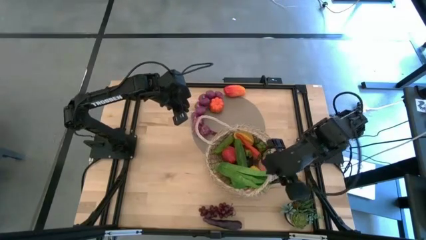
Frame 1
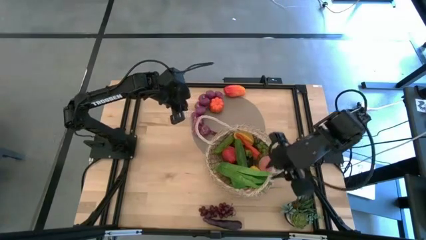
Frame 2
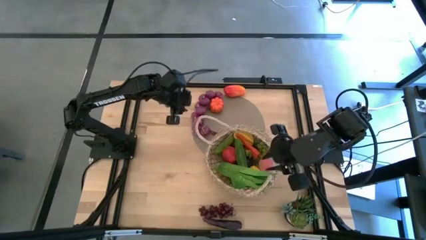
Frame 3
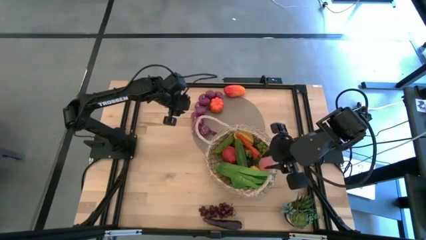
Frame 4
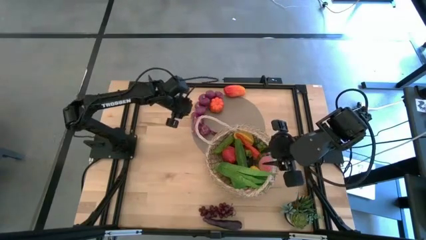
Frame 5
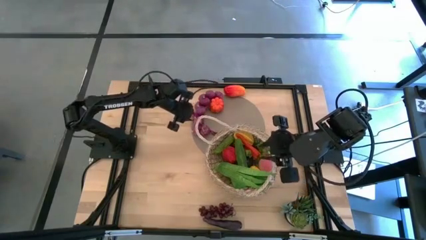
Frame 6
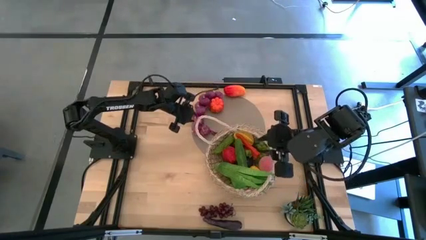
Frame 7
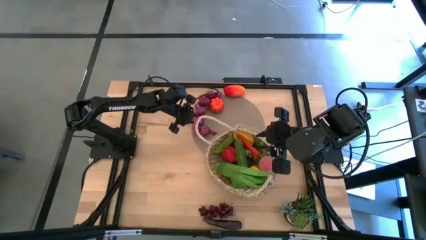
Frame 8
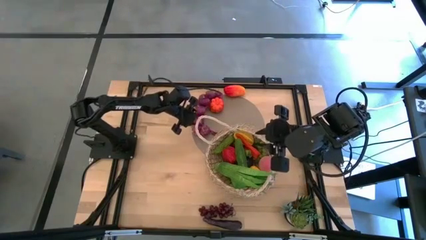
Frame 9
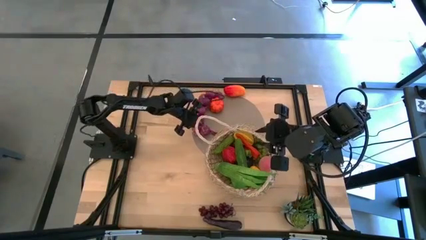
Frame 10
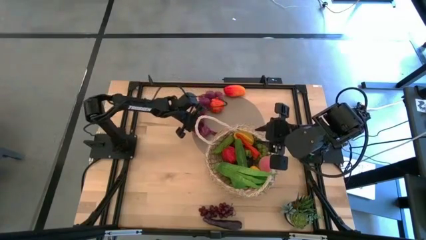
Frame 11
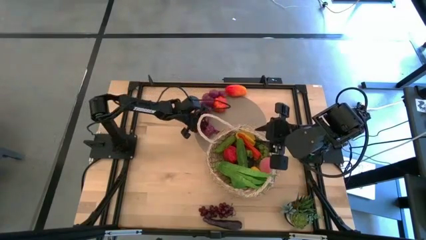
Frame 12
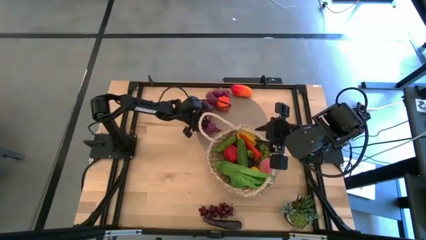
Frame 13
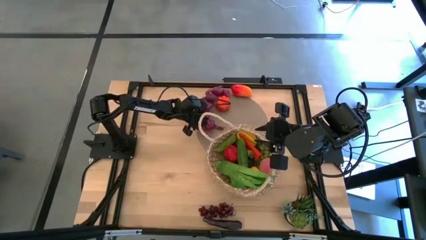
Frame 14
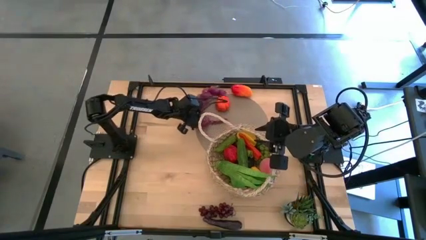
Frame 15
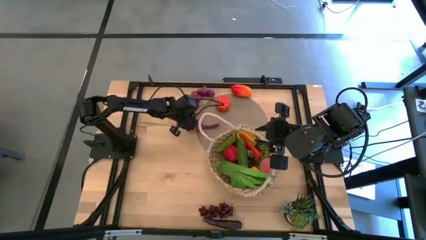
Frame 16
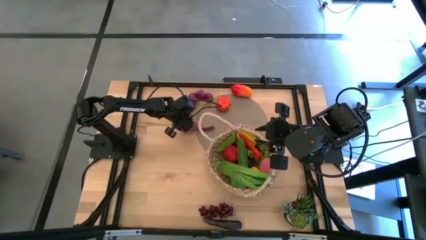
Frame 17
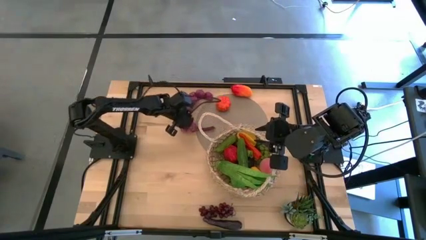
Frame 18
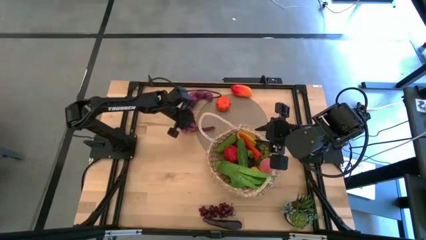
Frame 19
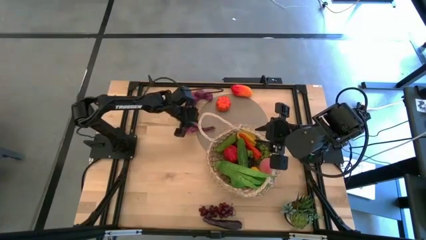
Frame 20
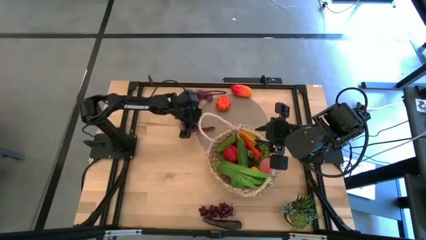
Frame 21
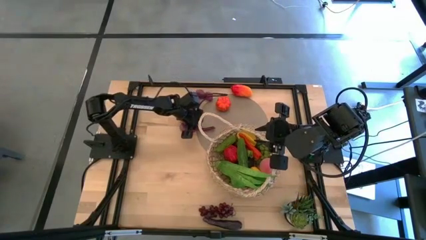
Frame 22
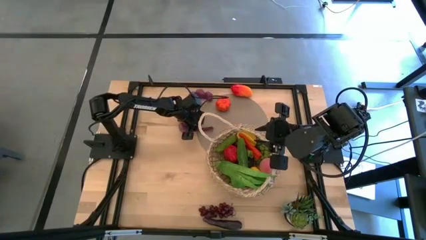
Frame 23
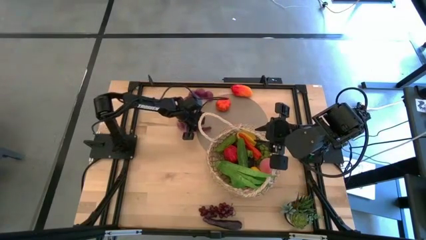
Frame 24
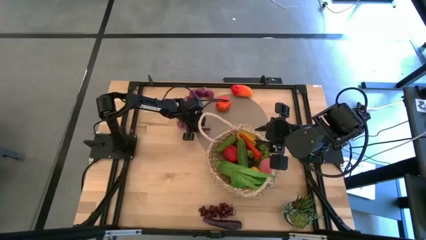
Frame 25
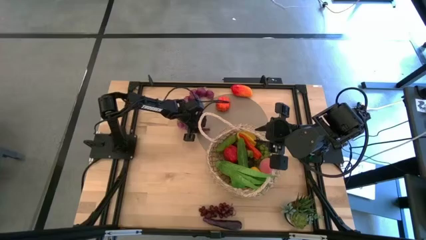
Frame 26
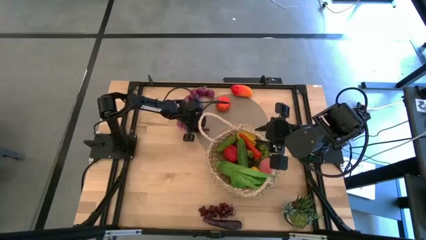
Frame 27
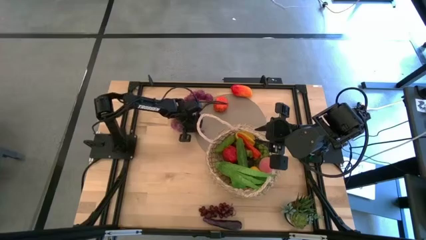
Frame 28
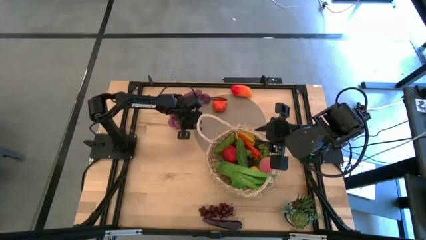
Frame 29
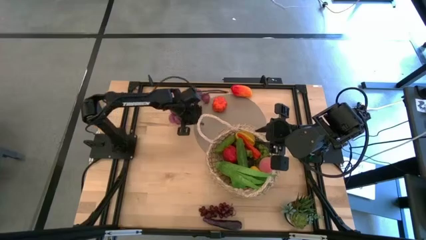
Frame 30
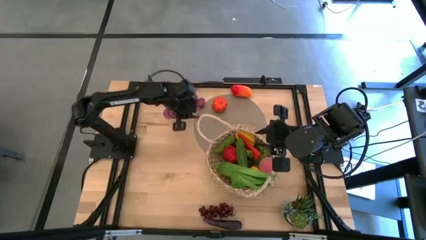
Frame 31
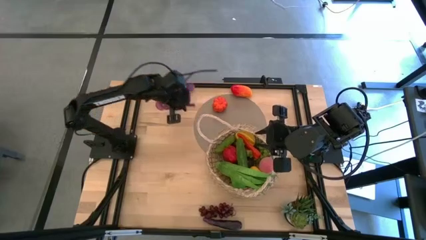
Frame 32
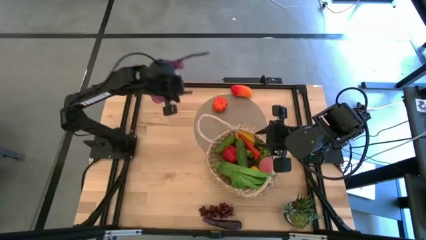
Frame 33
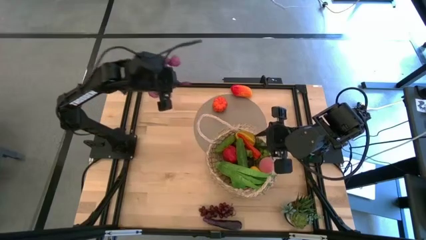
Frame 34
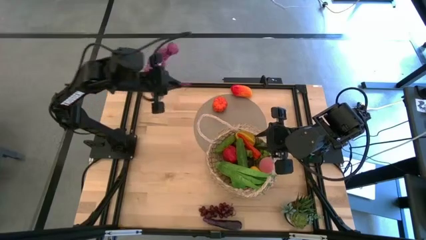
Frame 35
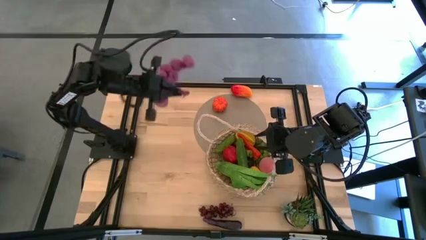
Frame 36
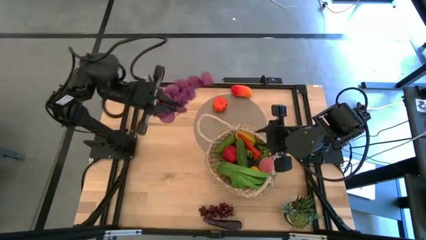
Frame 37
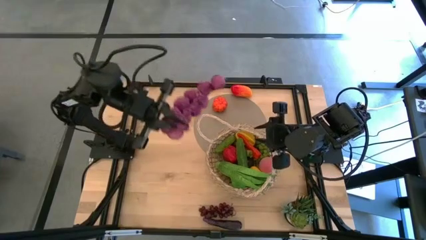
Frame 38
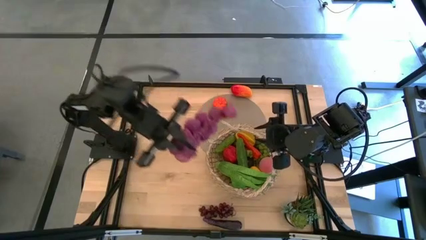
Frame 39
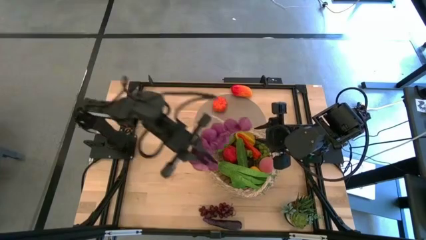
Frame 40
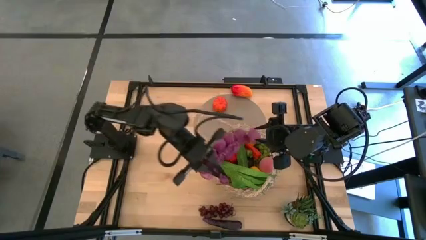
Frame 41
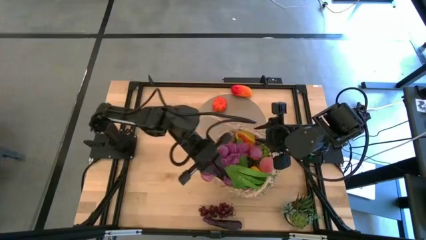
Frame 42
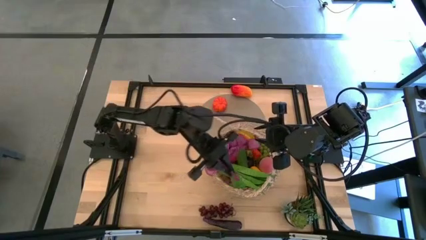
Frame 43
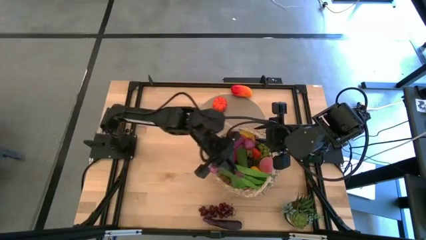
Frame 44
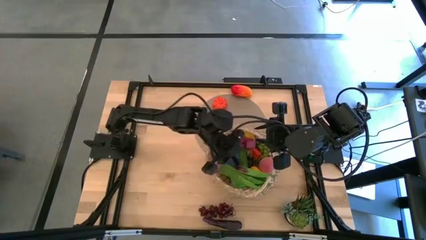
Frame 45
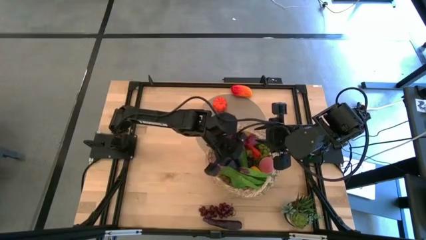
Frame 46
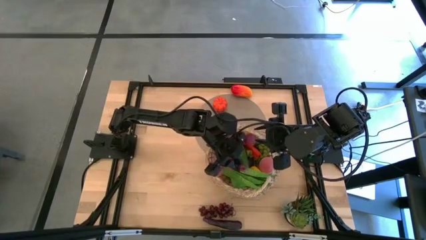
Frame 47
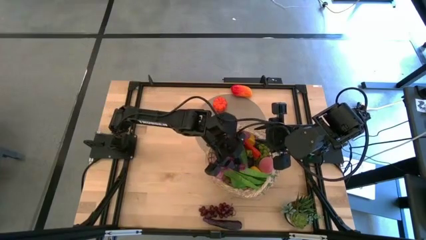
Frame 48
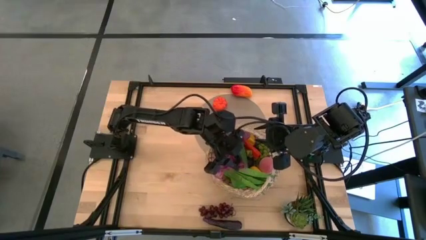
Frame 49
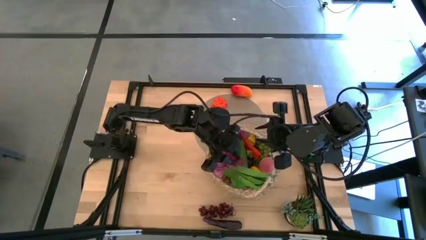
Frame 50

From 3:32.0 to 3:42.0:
Task: Build produce basket
Put the purple garlic into the brown basket
